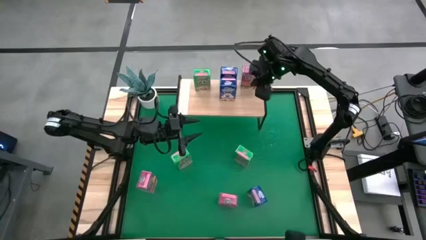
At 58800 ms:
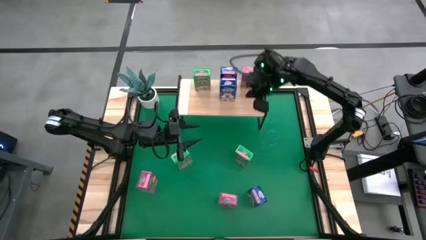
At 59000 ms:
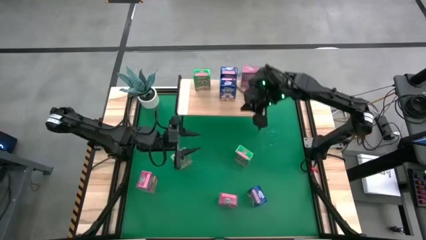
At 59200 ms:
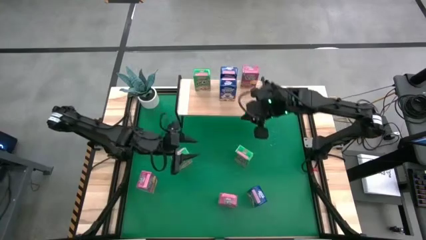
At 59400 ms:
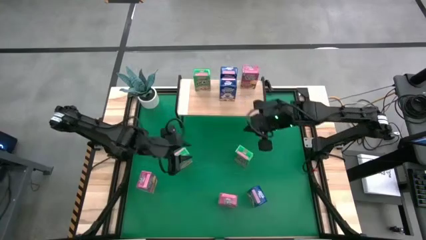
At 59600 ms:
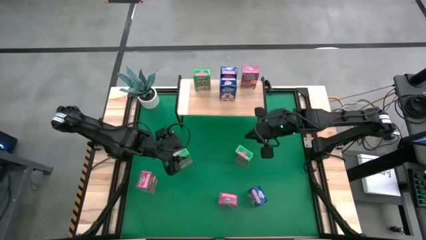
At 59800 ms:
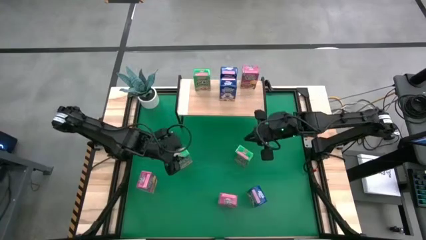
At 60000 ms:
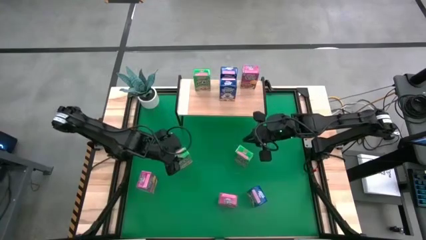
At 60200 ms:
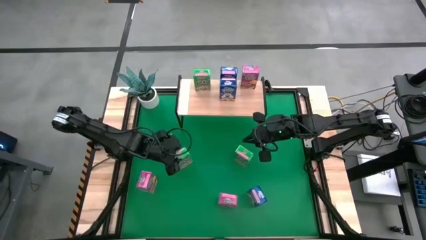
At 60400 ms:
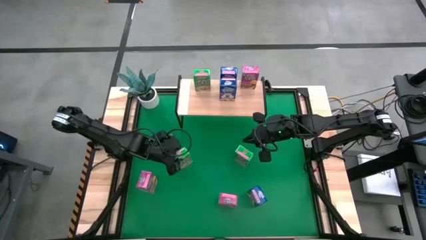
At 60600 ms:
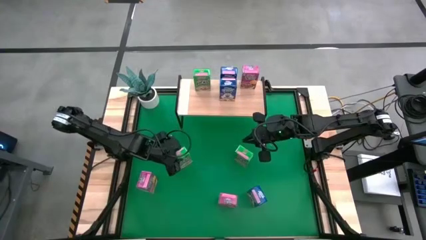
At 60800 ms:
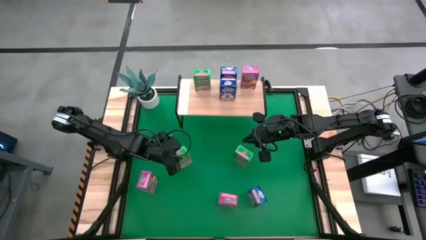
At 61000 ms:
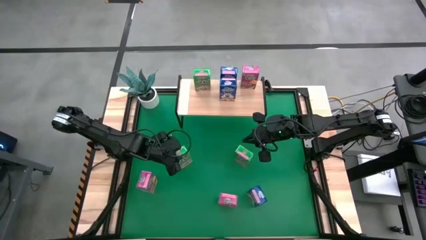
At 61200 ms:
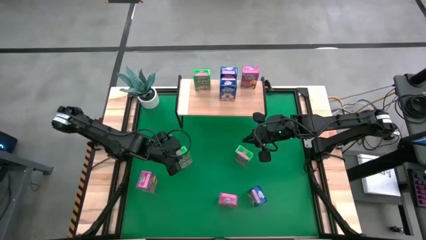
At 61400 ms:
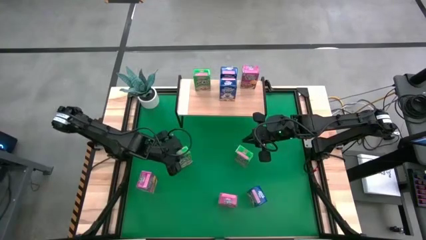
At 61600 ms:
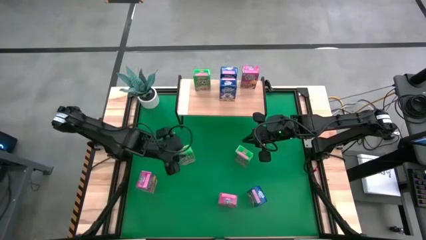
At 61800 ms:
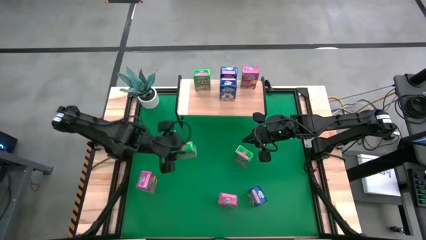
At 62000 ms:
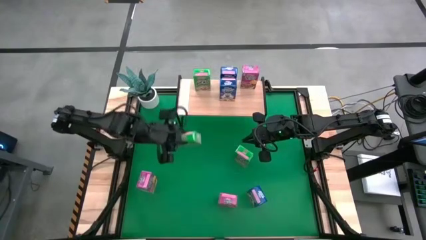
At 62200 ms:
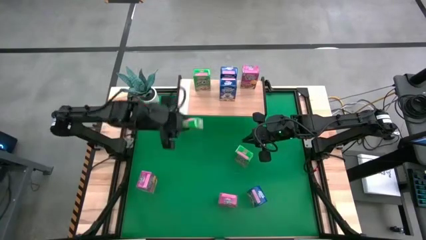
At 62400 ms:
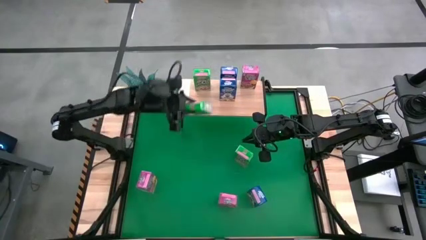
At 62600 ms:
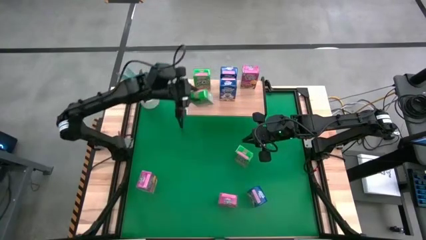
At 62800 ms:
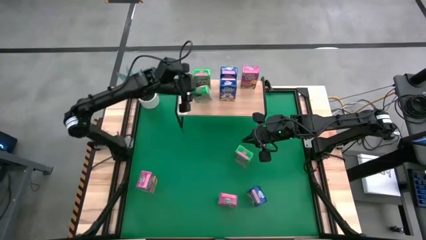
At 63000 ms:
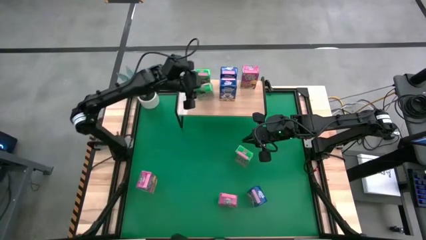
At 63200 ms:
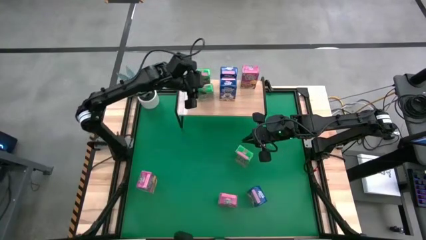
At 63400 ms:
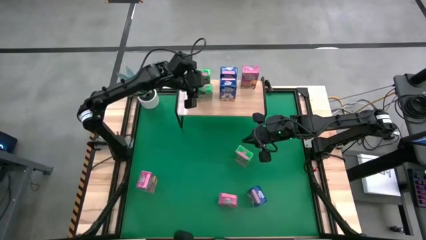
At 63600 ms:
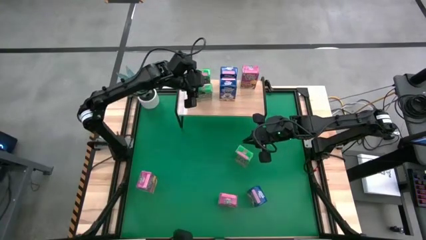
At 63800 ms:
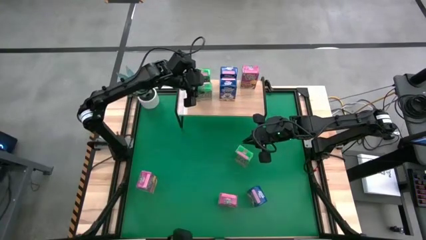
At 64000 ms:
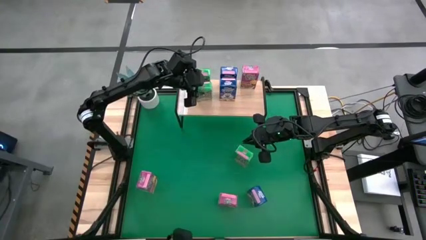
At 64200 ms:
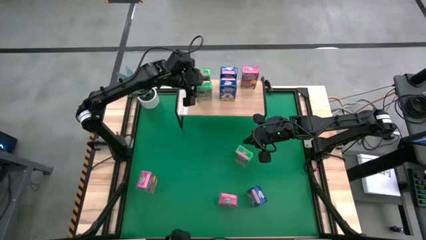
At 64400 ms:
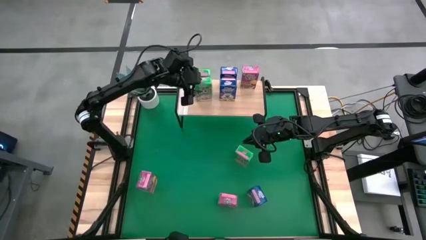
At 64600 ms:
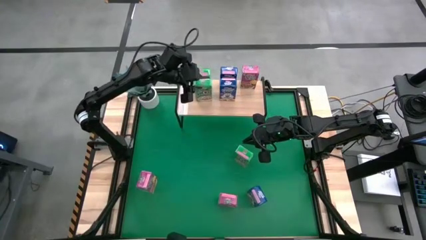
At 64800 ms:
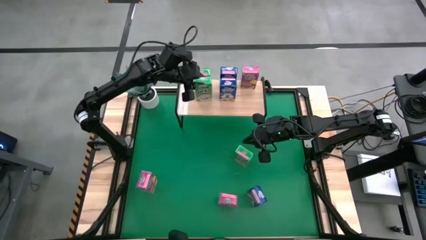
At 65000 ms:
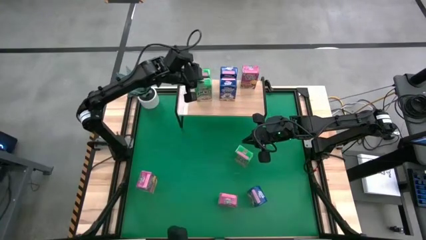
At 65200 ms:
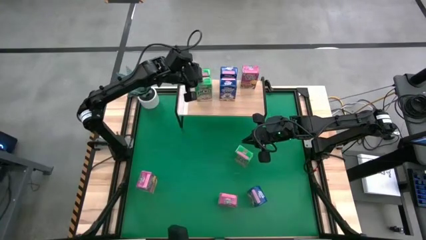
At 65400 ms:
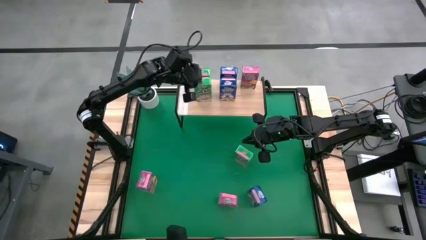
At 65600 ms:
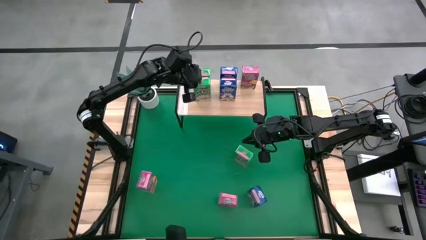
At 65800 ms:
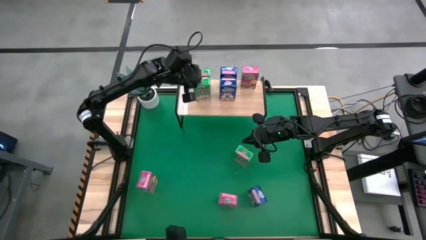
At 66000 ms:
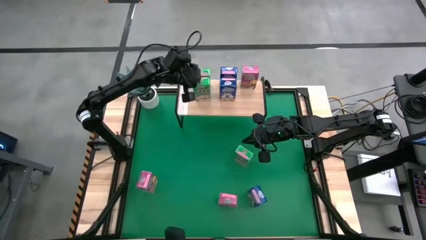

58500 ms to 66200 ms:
Task: Stack cereal on shelf
Put the left green cereal box on the shelf aligned with the other green cereal box

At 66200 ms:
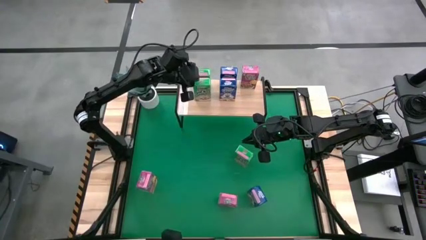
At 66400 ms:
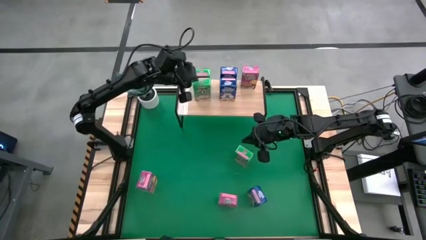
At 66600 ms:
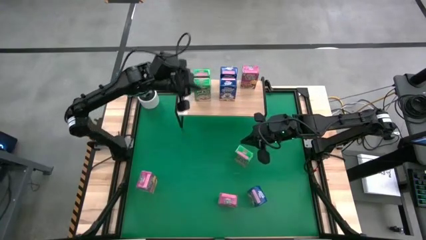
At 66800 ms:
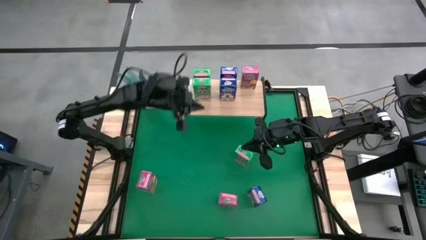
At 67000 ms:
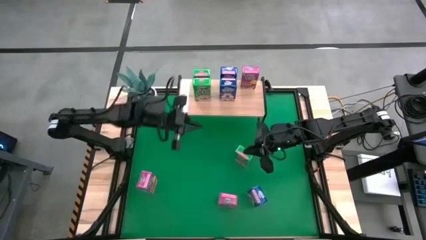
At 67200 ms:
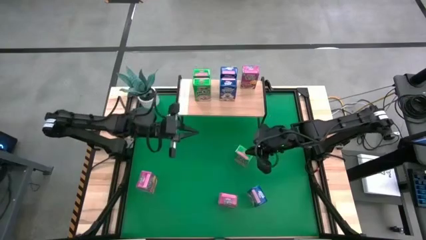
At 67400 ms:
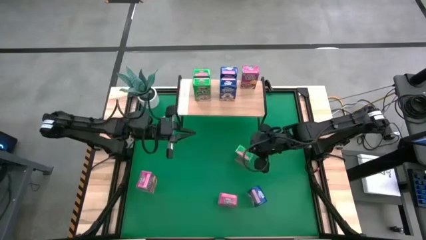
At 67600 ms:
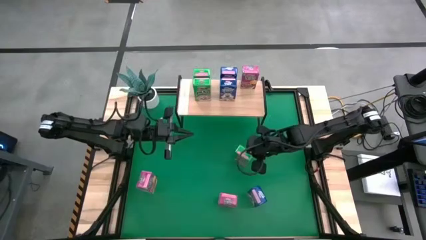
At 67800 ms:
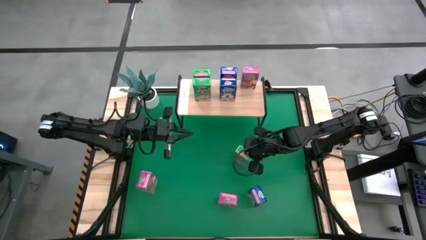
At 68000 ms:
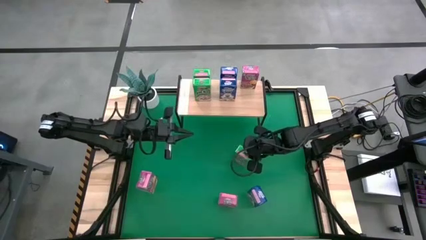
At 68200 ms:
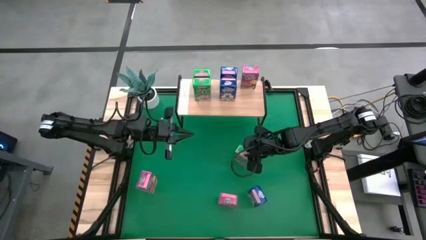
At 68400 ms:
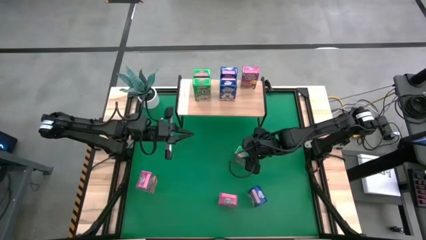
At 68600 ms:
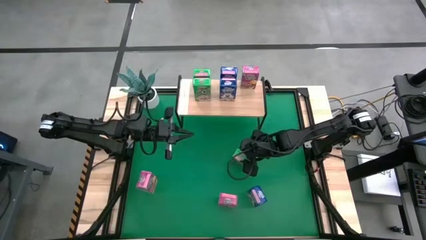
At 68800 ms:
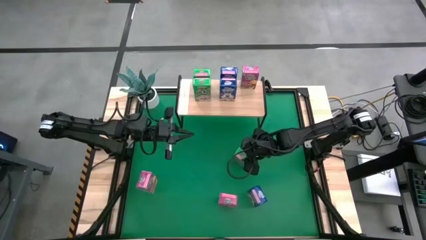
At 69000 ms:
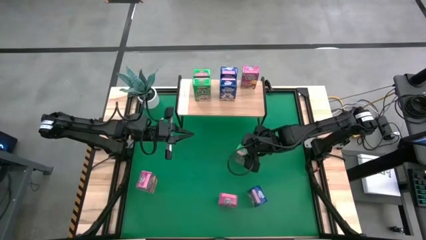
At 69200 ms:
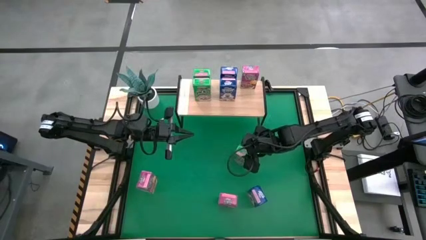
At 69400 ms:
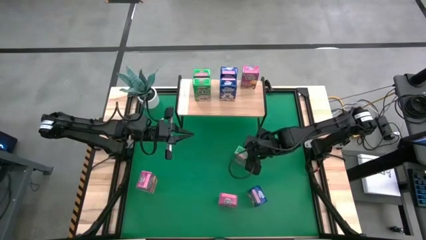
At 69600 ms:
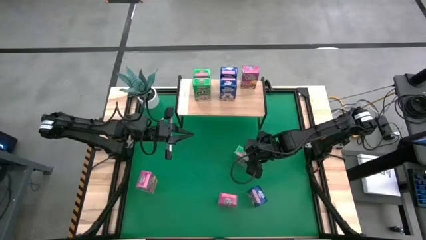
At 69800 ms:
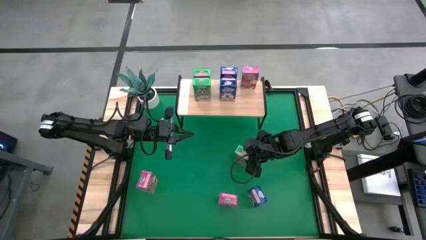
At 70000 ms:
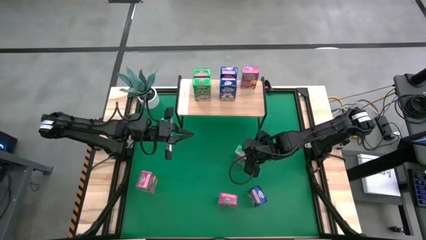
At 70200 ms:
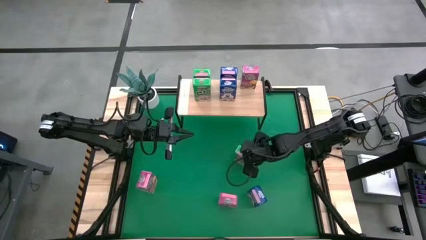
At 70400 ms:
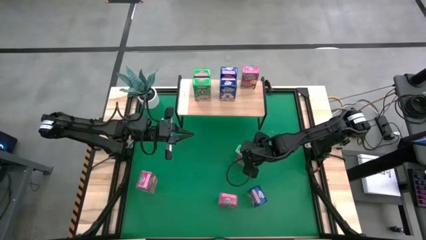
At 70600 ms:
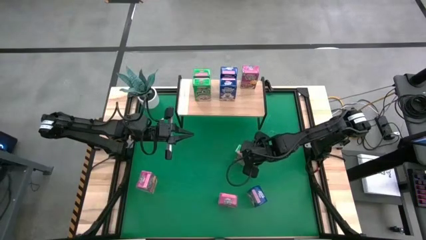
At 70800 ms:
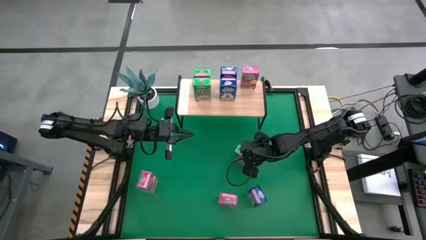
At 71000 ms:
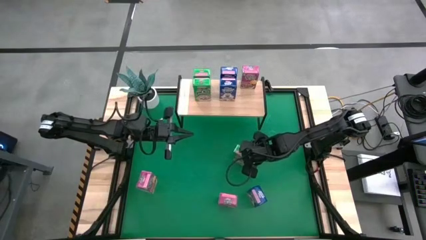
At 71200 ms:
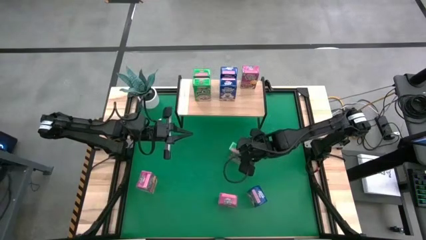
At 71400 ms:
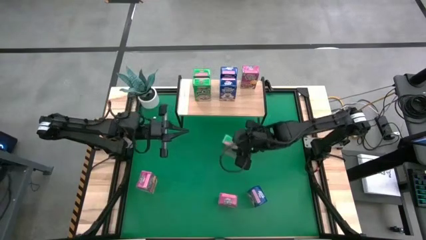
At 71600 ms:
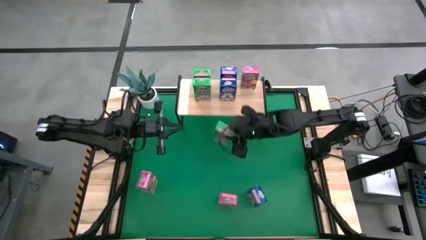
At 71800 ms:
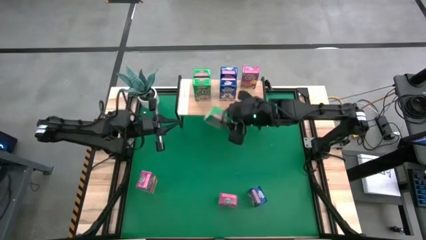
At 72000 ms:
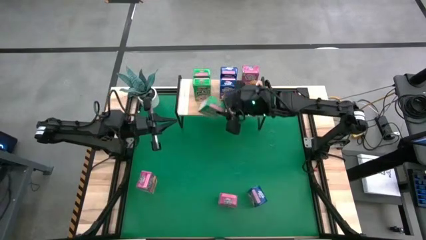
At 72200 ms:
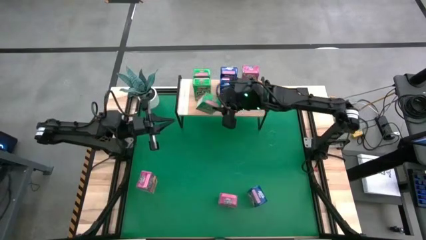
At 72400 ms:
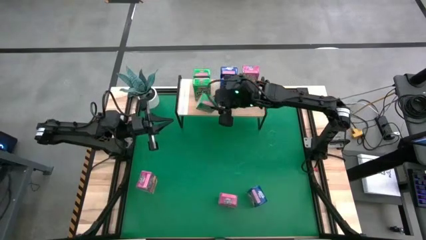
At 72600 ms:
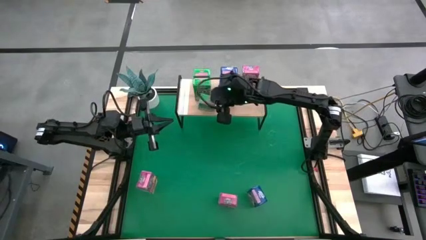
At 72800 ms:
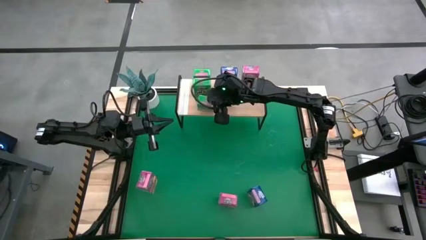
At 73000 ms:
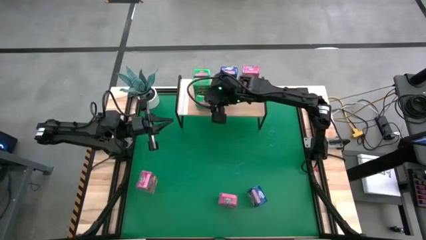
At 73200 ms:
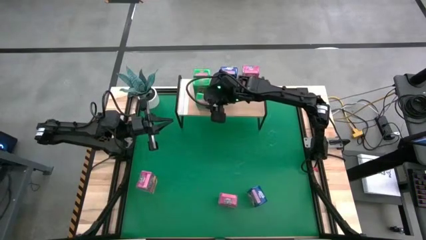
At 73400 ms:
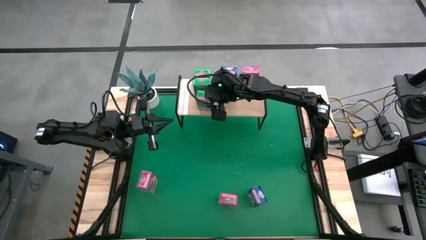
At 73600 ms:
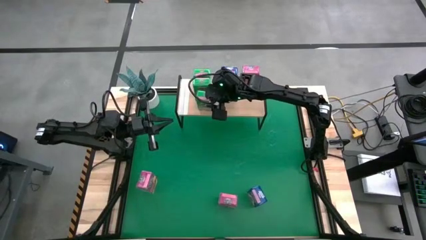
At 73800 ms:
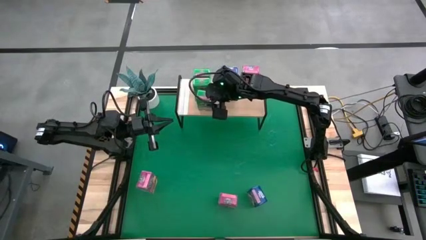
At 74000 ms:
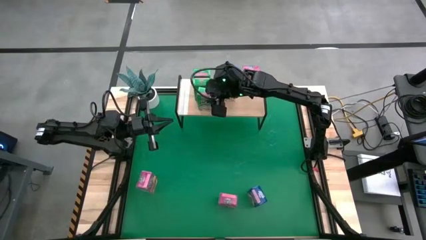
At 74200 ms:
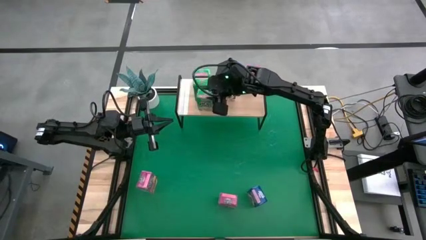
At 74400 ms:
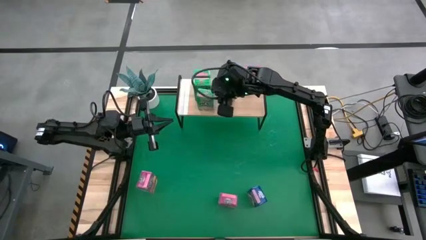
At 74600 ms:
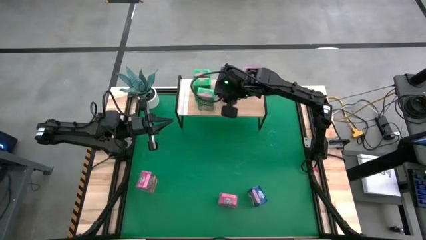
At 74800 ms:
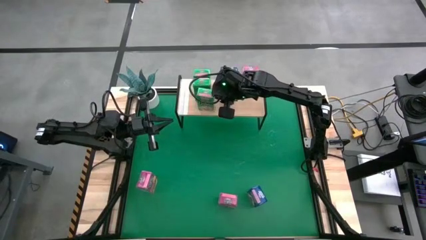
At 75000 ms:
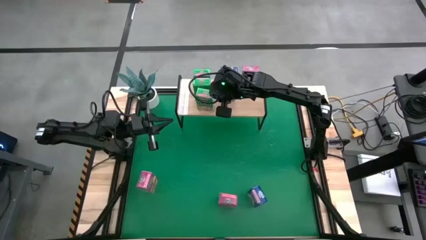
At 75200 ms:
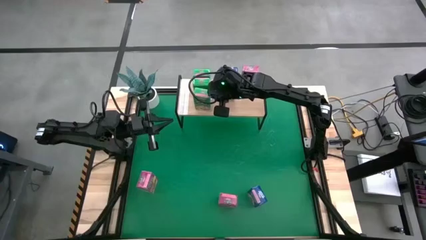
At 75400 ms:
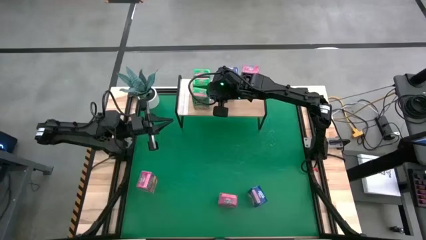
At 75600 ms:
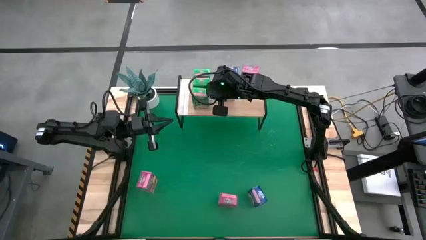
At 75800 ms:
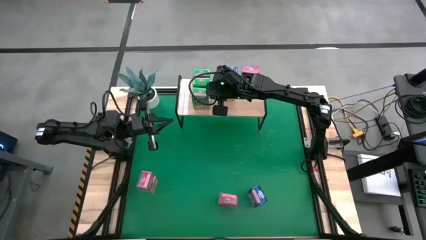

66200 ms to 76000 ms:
Put the green cereal box on the shelf aligned with the other green cereal boxes
